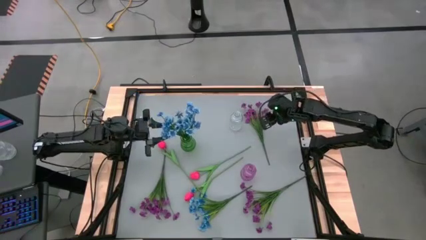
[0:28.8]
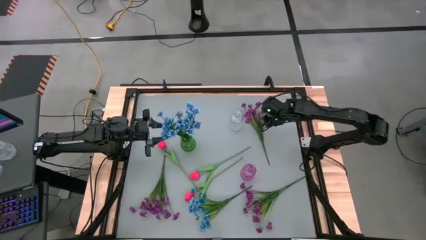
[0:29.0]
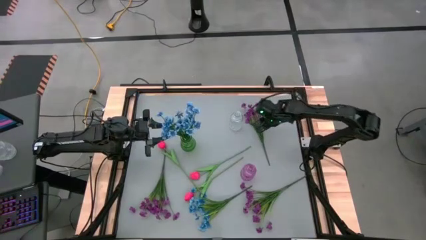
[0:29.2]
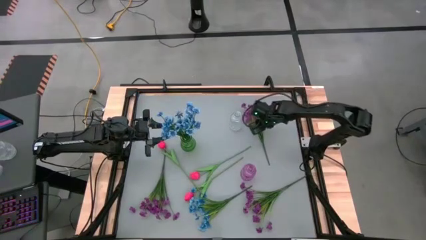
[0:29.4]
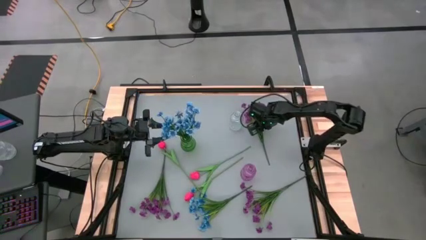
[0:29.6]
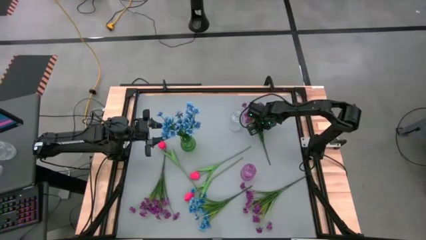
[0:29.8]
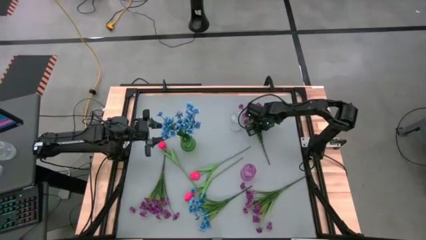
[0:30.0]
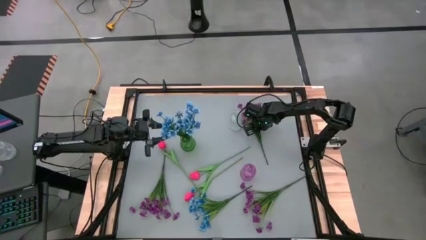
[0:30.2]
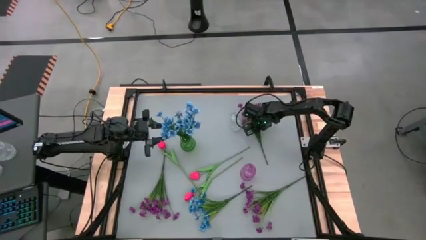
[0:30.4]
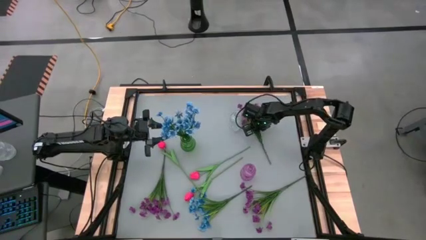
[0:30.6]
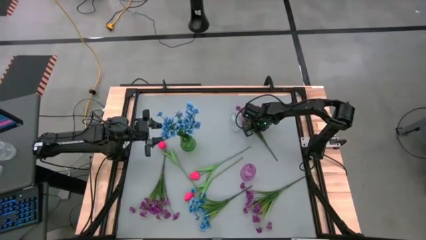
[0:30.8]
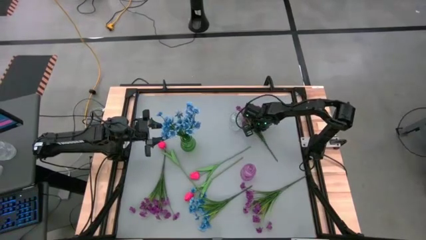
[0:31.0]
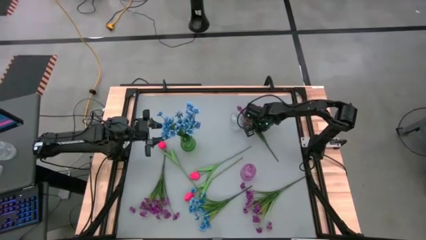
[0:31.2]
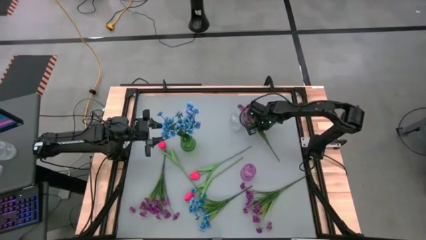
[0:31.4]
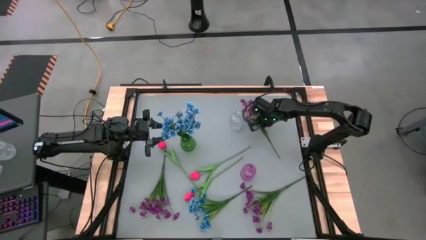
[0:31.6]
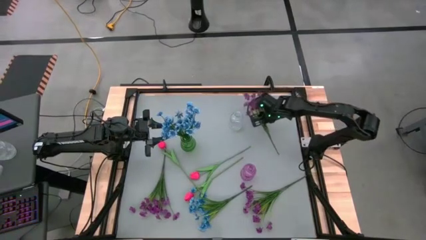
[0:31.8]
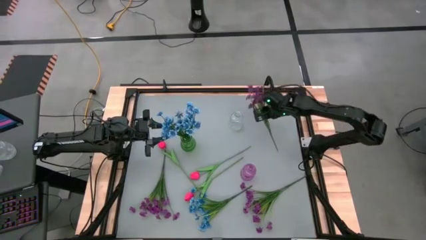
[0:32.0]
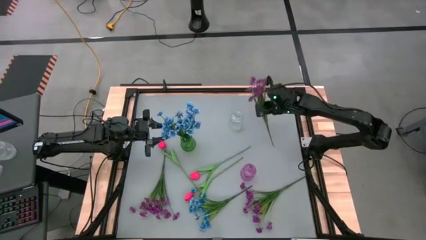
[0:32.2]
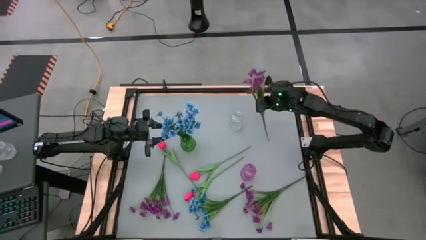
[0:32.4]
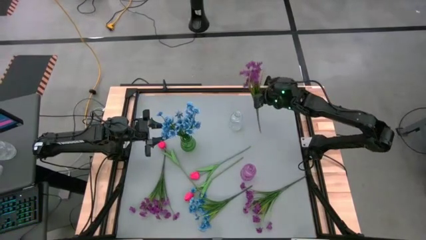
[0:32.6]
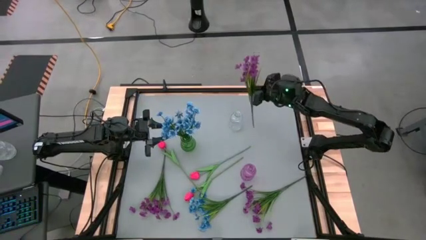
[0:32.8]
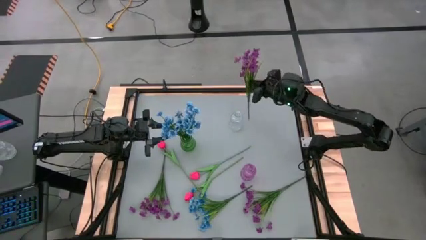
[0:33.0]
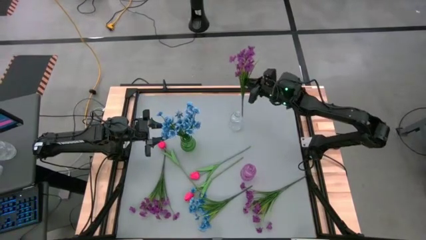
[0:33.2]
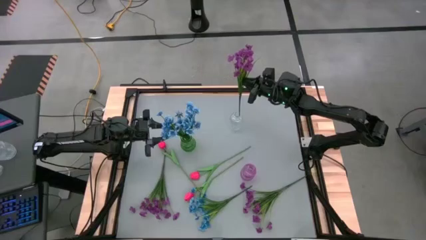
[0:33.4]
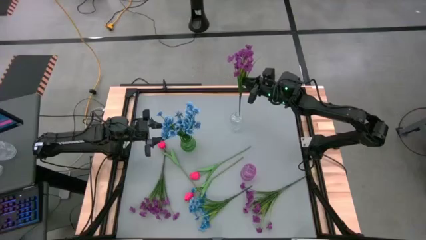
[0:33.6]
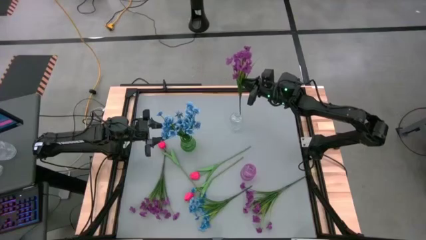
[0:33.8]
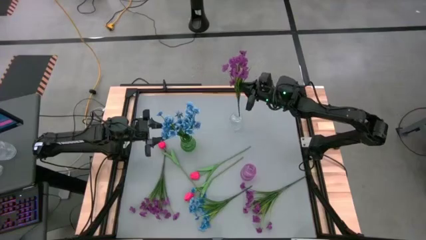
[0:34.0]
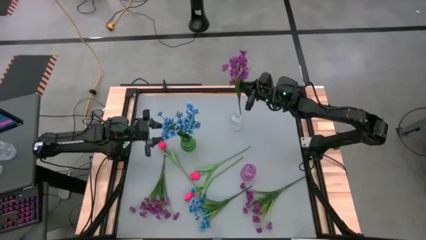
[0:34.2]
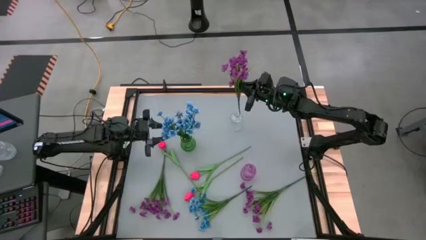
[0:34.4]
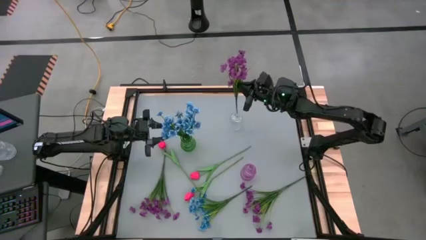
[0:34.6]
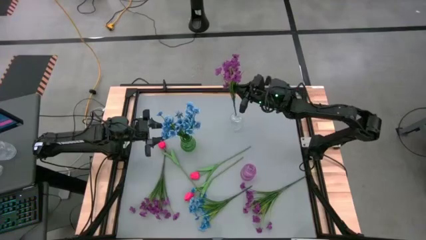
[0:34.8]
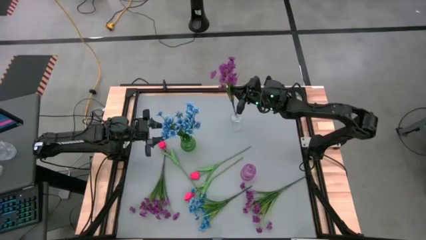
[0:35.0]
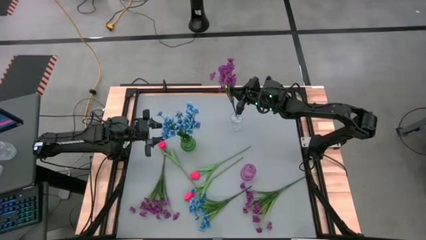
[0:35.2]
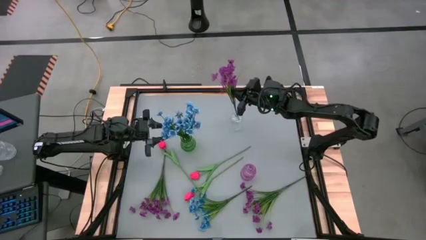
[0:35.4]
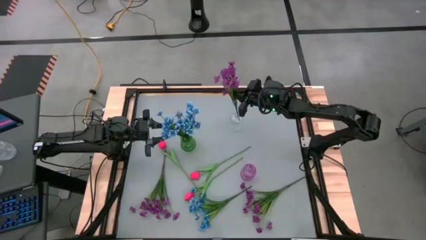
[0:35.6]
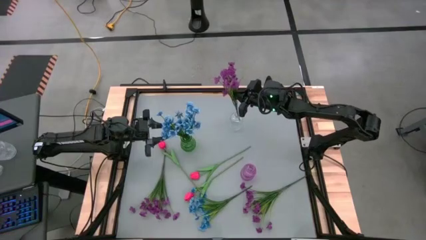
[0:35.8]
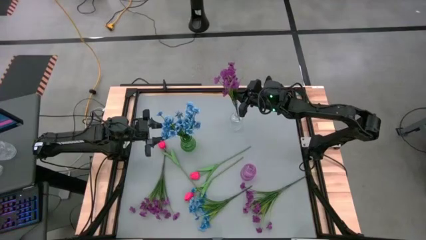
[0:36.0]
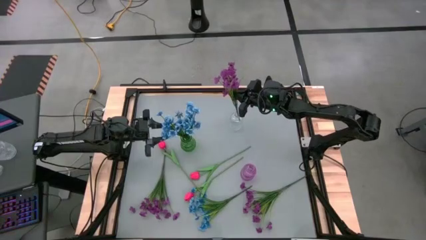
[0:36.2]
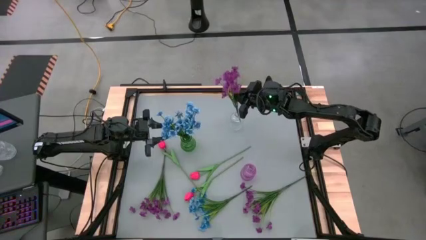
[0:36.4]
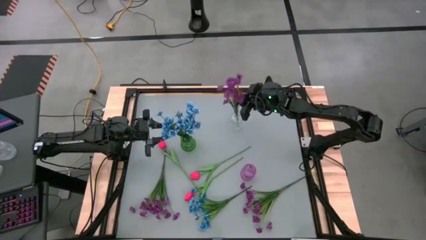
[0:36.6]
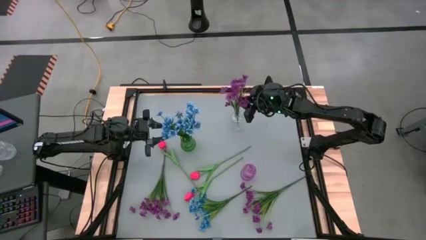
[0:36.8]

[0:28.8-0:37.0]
Task: Sort flowers into vase by color
Put the top right purple flowers into the transparent flower vase

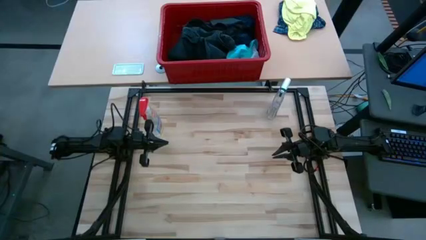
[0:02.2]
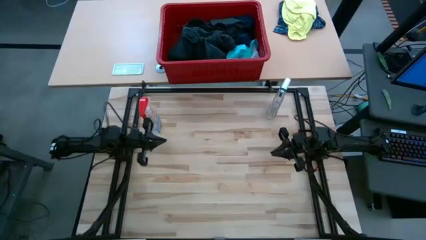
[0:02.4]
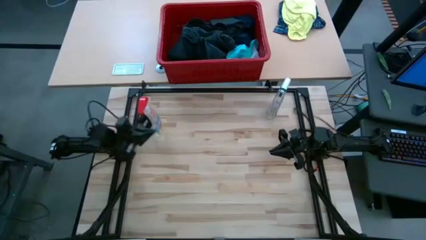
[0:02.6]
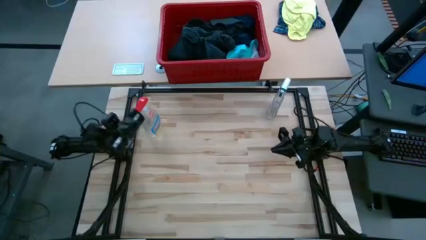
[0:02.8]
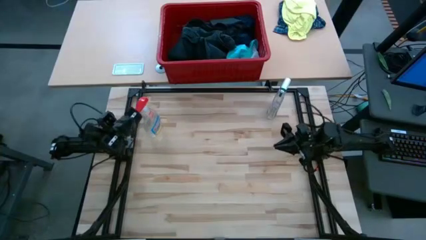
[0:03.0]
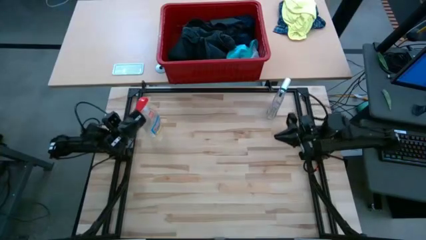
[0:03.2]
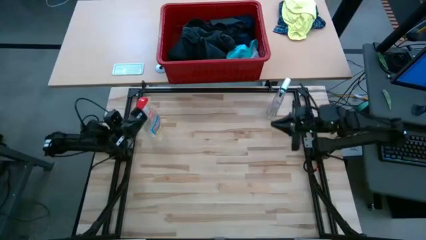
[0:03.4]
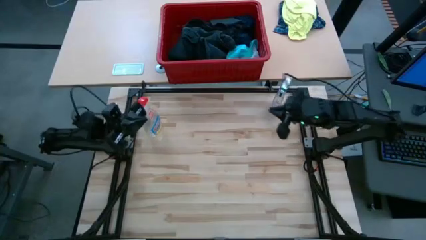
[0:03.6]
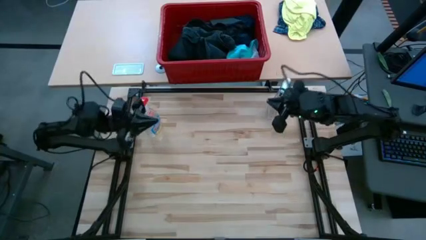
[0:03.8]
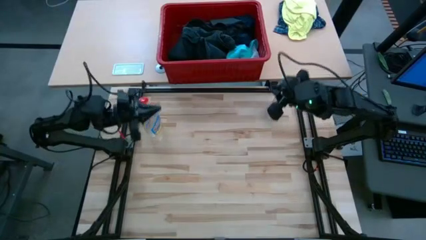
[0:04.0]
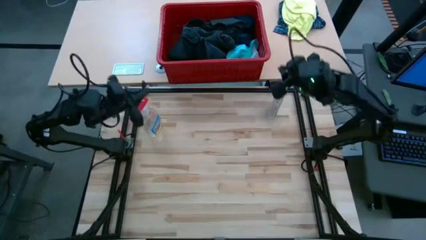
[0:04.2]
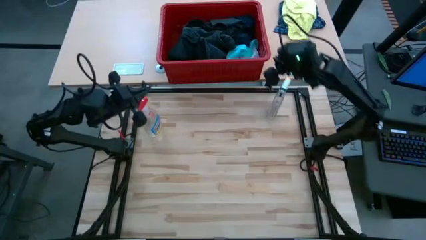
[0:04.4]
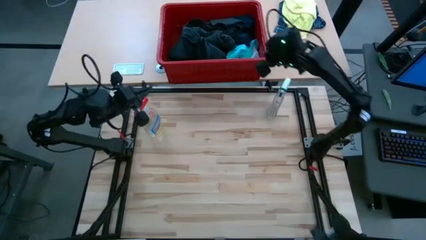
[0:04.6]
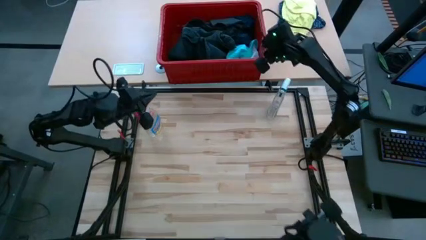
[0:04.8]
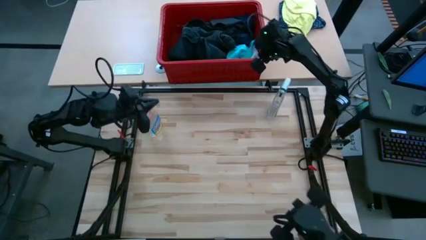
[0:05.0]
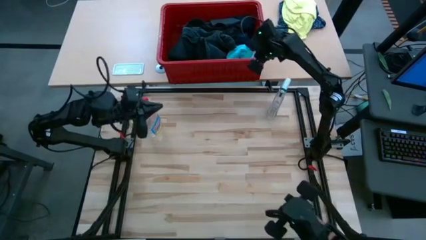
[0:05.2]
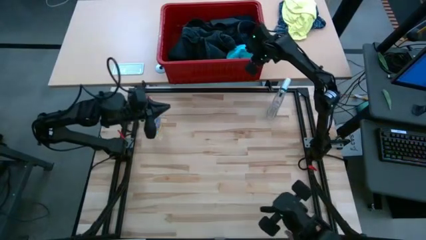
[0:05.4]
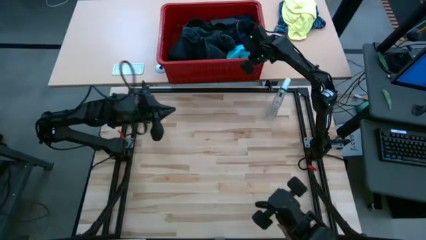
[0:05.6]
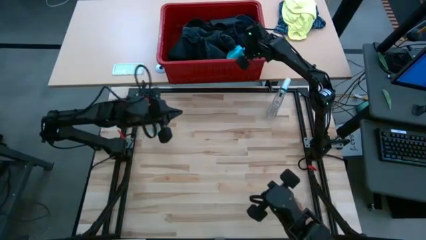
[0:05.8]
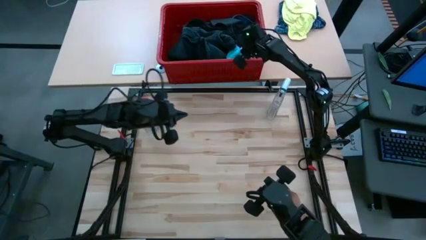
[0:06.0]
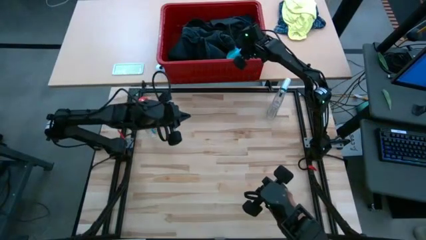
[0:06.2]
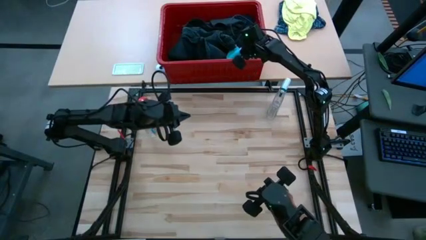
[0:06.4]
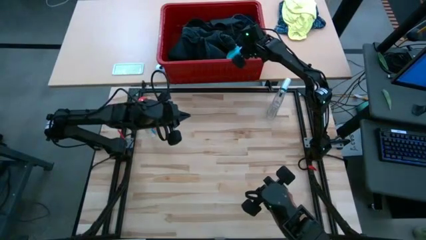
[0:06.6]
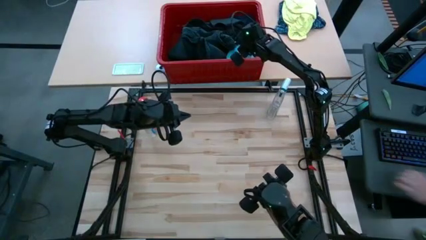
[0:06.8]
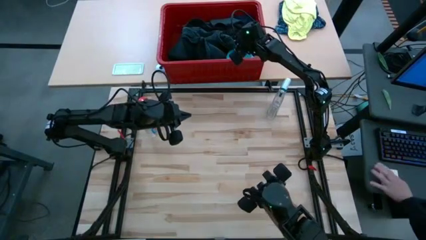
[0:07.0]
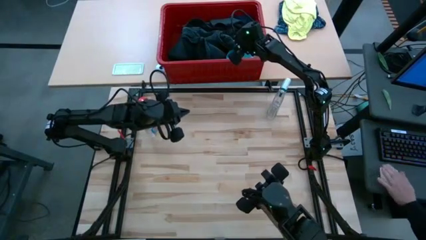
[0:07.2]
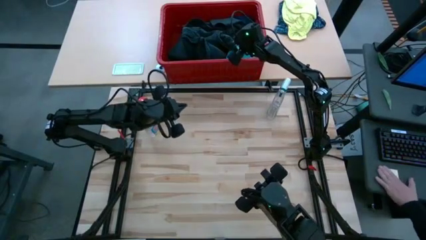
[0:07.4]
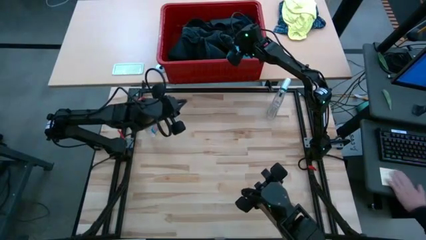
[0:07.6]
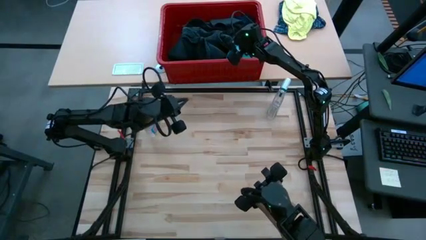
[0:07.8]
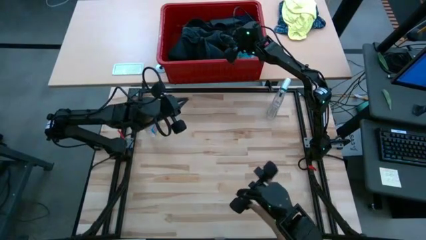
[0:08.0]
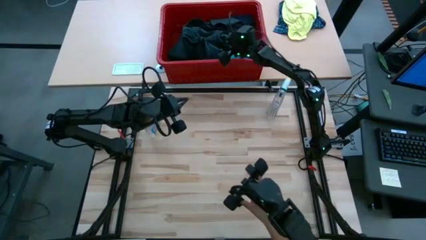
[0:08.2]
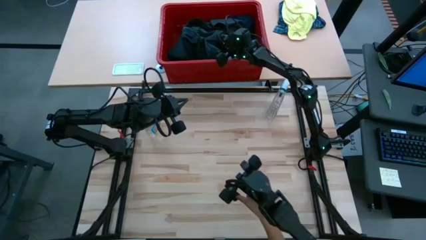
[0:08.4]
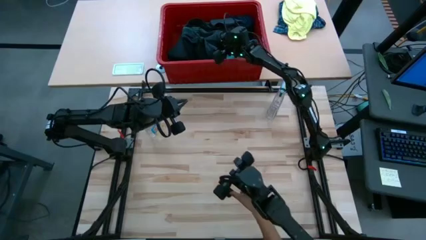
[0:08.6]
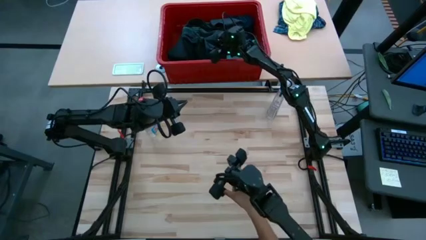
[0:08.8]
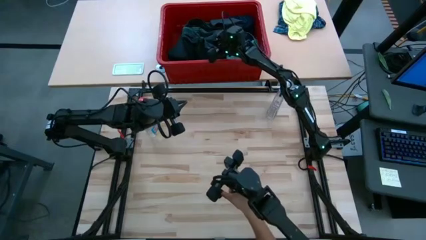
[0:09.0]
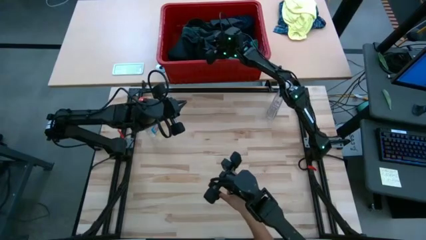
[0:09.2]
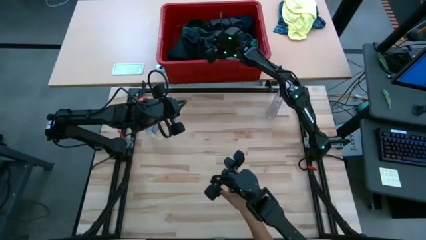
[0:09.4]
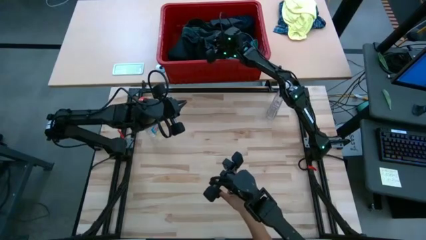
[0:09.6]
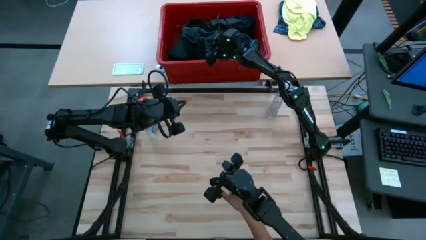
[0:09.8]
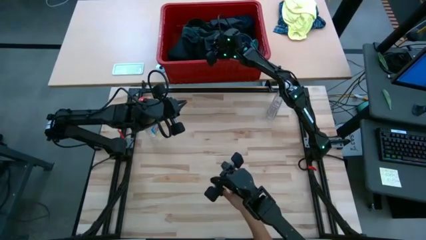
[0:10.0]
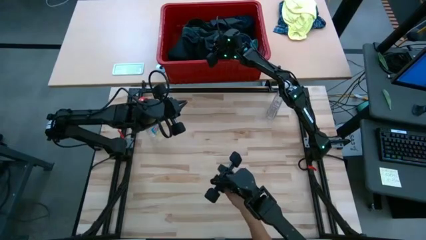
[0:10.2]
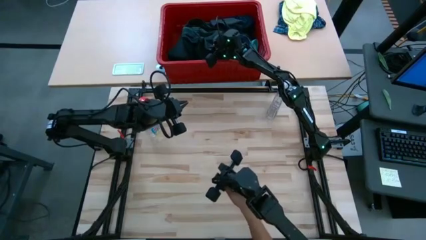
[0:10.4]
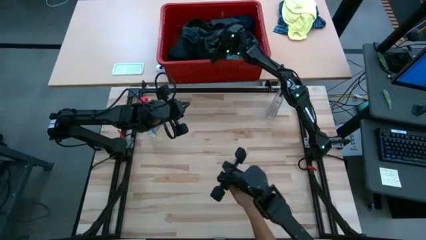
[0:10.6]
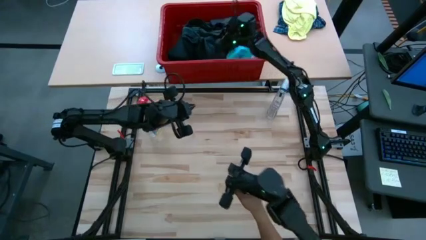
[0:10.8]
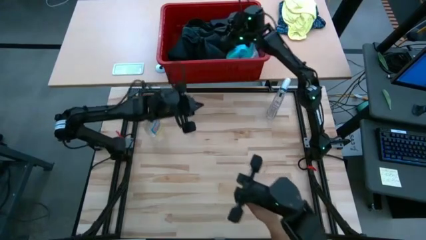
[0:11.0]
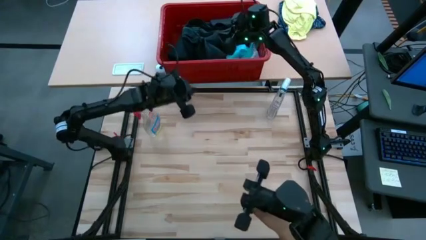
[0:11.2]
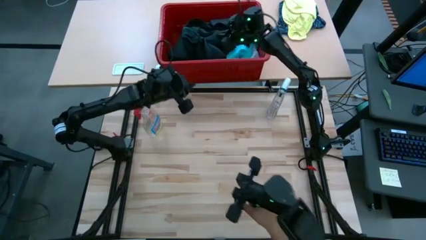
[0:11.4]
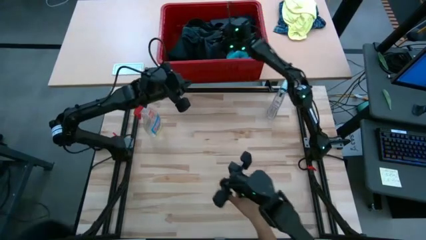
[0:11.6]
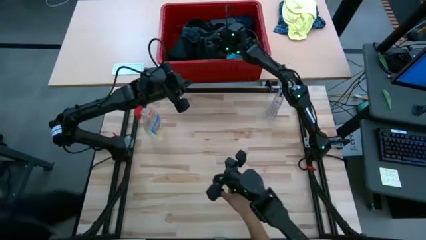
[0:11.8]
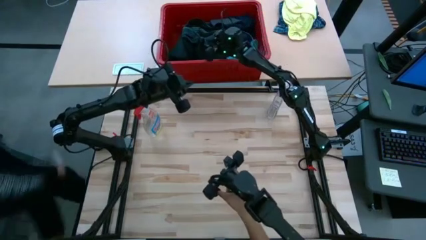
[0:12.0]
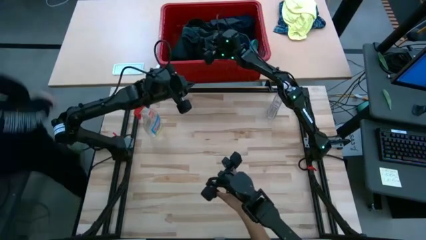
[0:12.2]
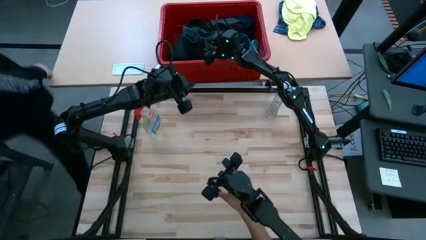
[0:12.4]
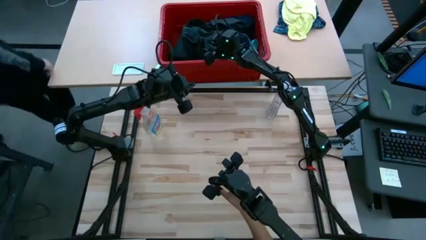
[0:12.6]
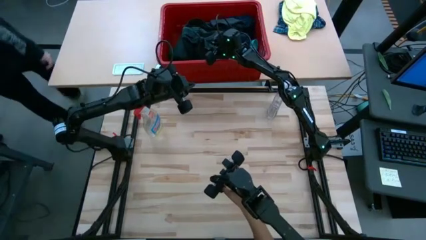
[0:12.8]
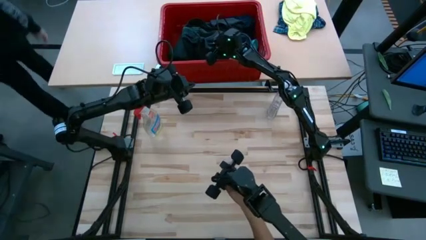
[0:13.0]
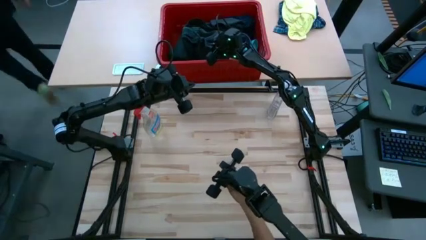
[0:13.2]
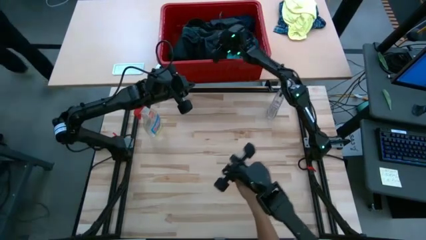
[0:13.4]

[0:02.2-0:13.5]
Task: Fold Laundry from Bin
Fold the blue pants
